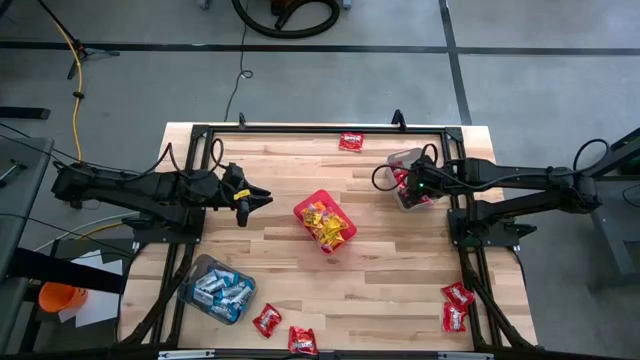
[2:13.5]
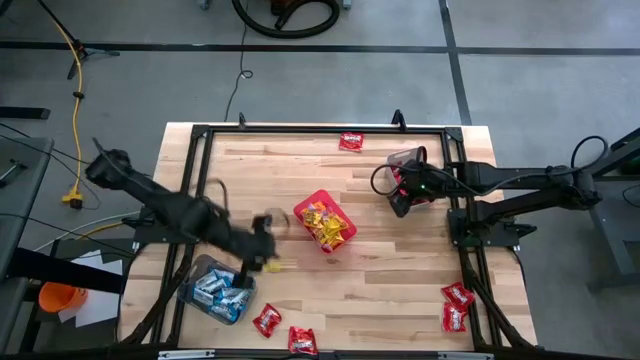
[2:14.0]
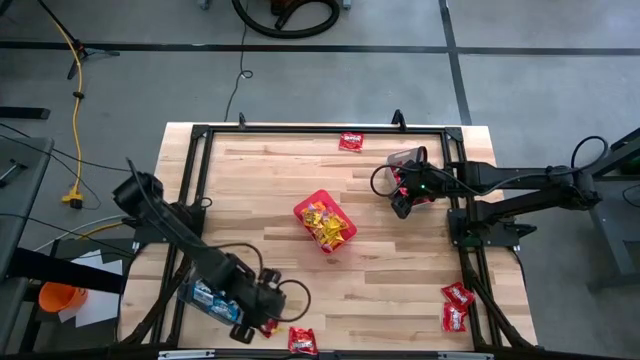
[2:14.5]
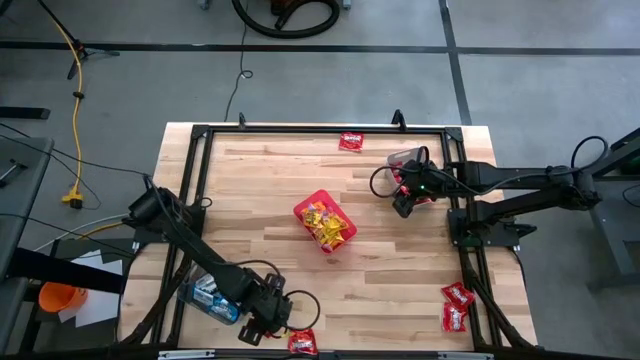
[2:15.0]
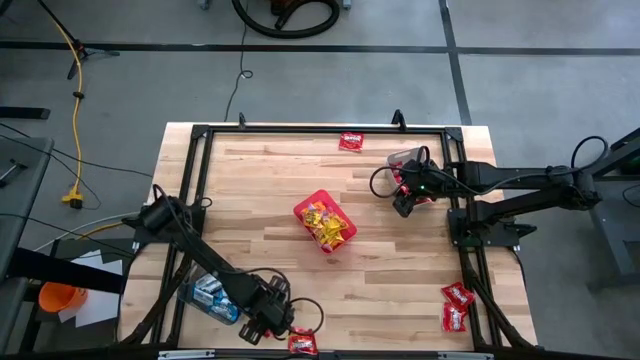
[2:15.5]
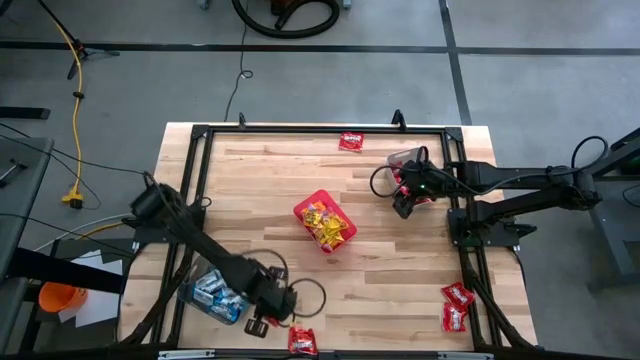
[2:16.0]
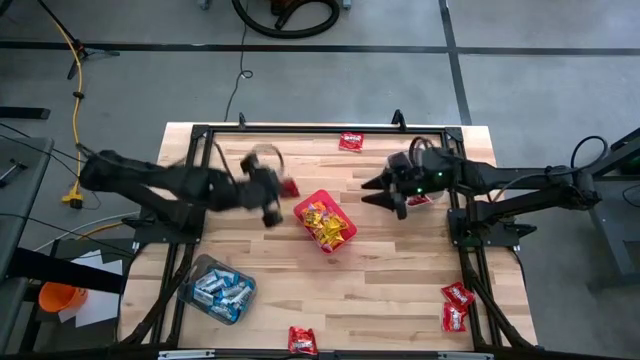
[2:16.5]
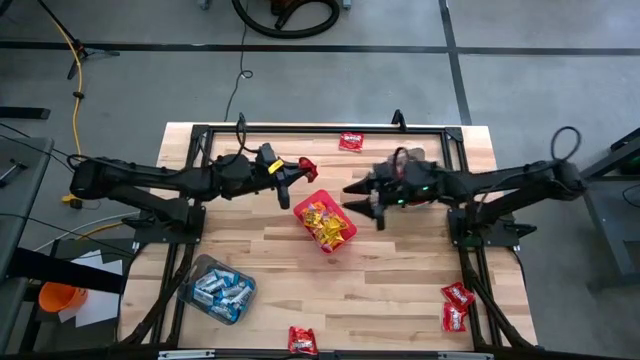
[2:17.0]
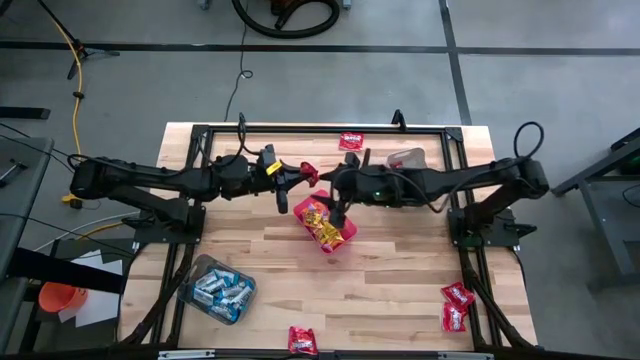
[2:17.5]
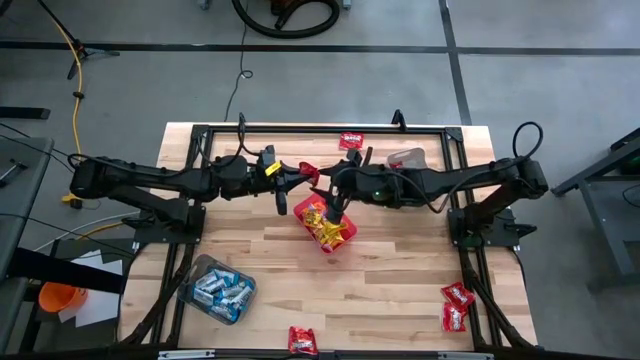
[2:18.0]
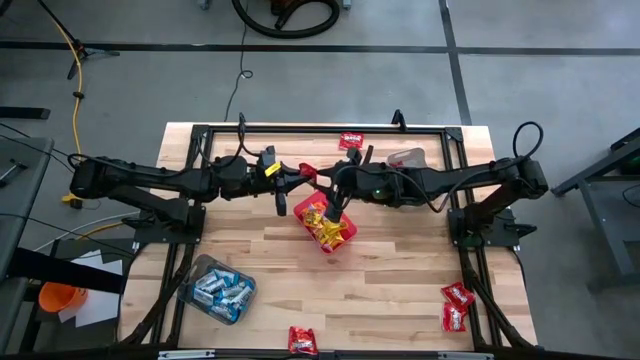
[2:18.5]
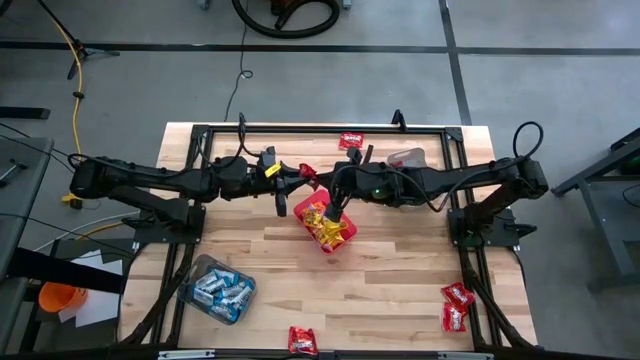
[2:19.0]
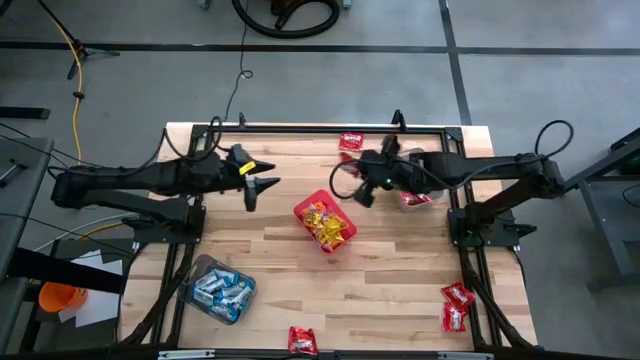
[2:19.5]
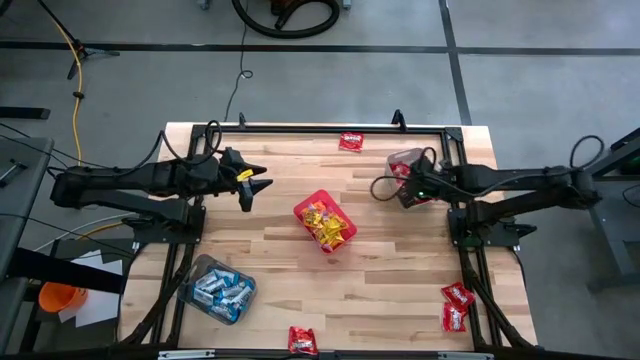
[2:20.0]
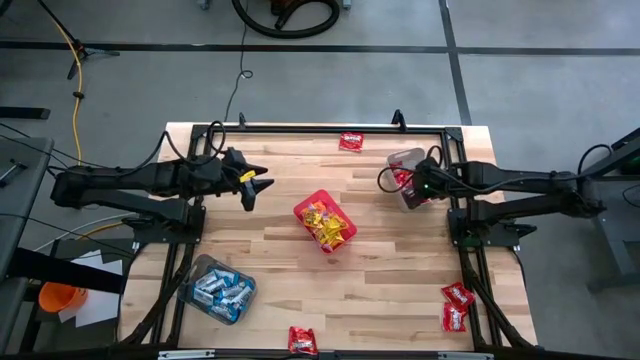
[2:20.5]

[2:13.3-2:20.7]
Task: Sort candy
Put the red candy into the gray bin

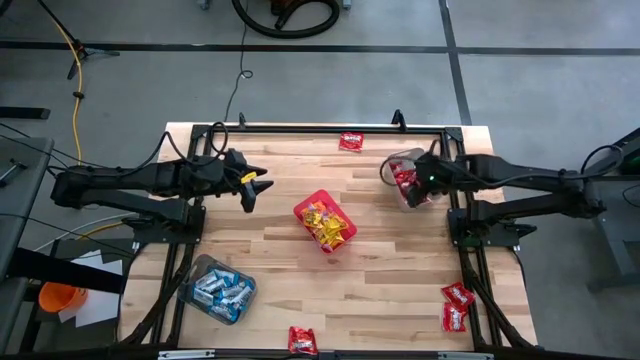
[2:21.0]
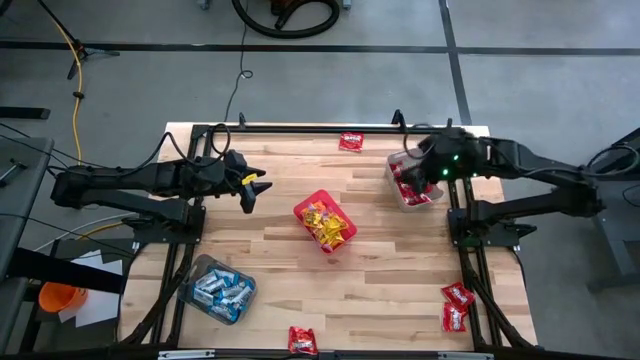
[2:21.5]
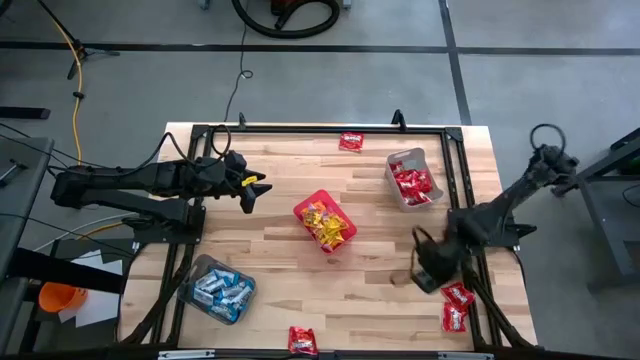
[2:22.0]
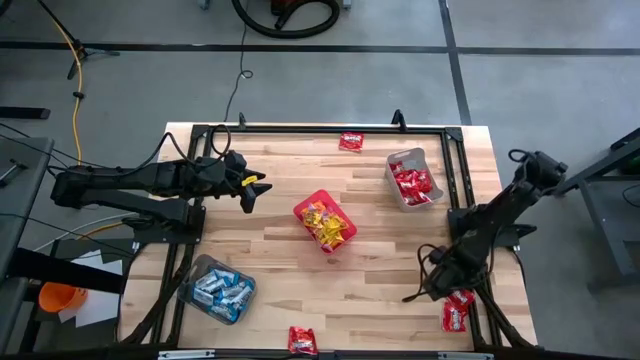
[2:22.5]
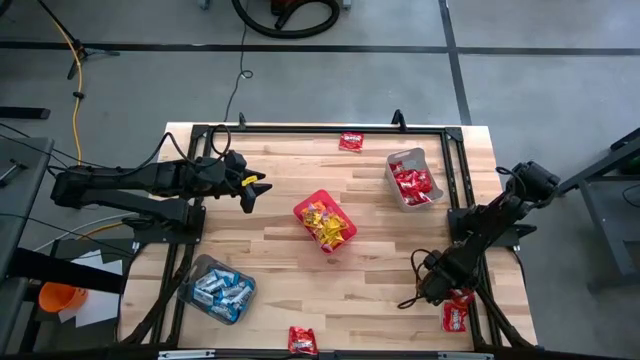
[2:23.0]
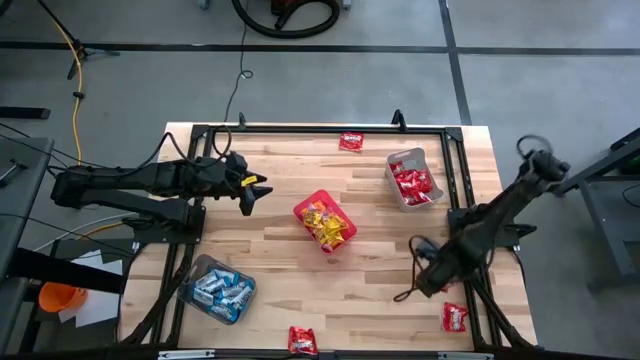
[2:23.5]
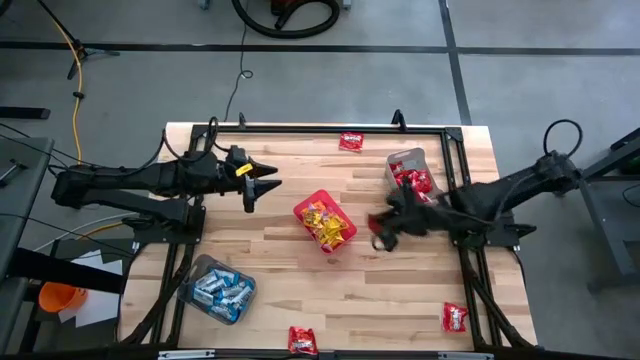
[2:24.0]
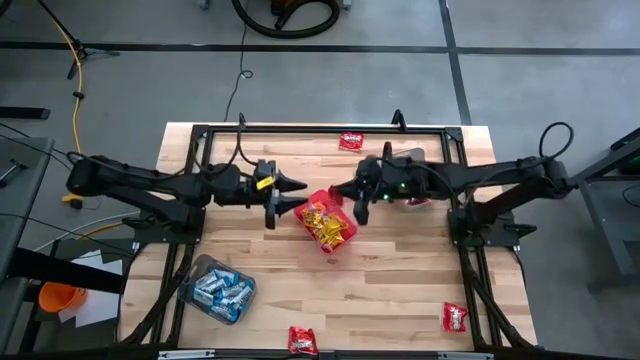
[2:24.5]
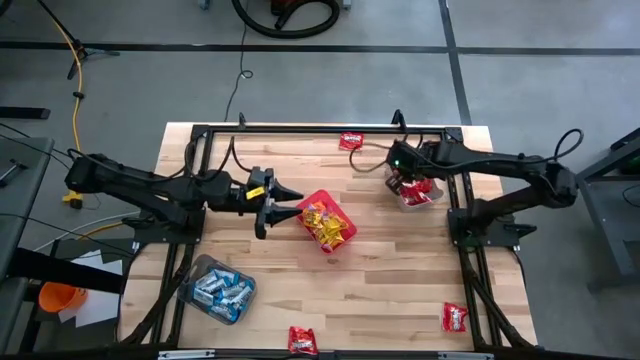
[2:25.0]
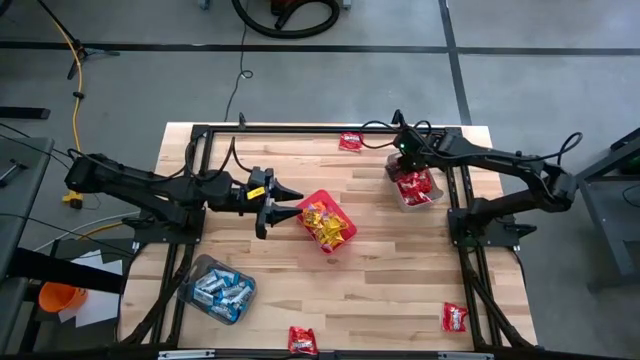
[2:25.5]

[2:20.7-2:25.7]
Put the red candy into the gray bin

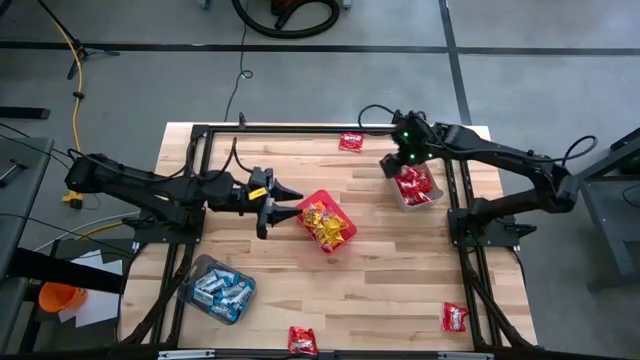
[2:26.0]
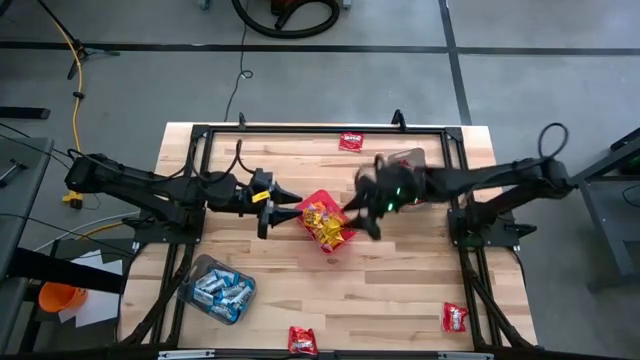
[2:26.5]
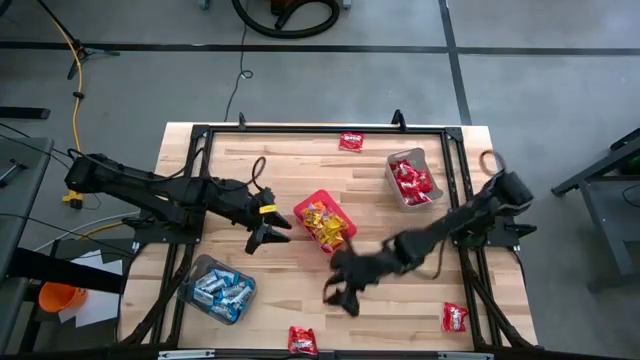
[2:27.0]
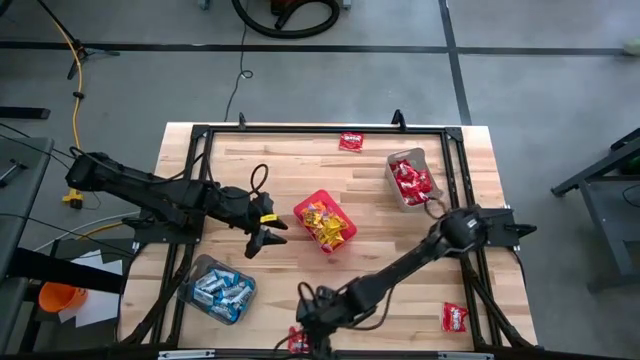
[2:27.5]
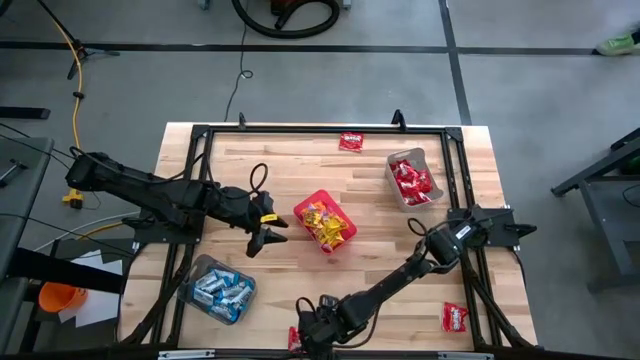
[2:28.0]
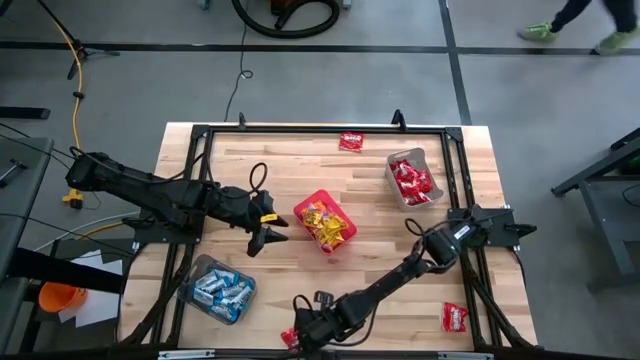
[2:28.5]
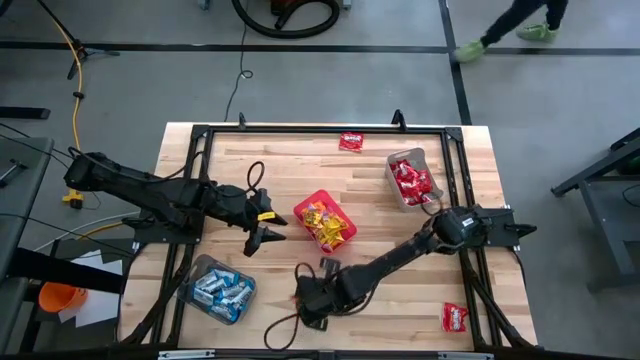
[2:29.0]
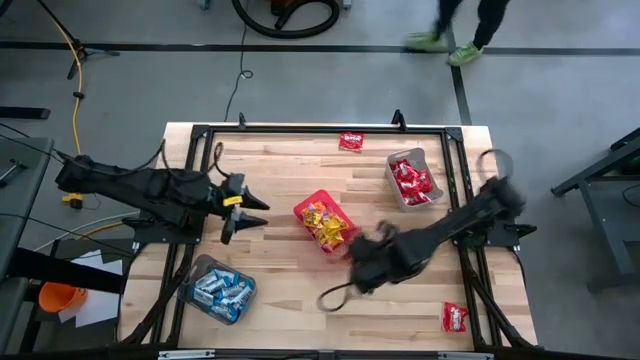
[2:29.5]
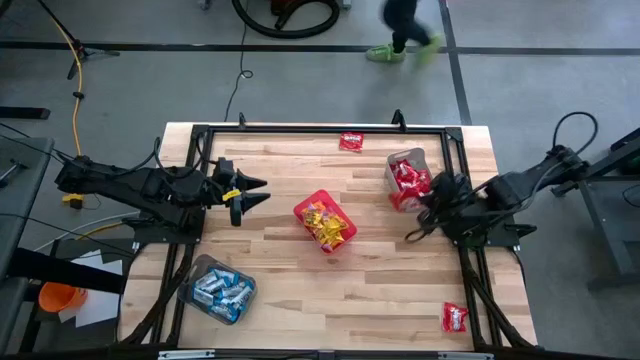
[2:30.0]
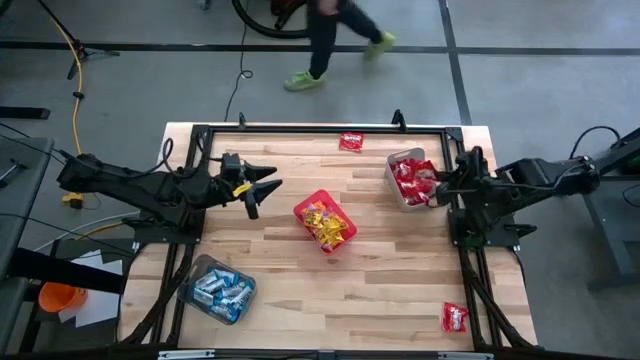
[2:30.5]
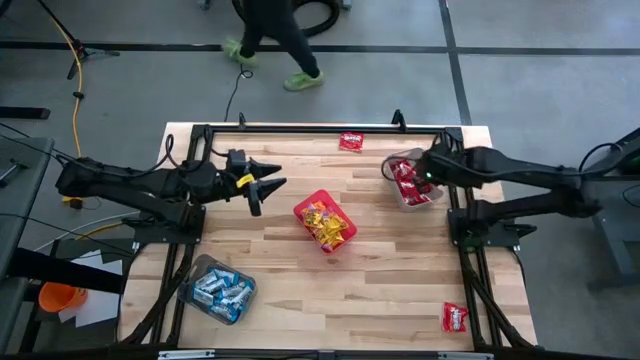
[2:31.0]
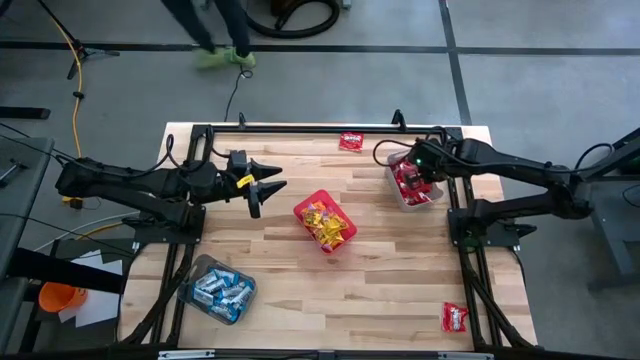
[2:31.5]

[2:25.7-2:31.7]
Put the red candy into the gray bin

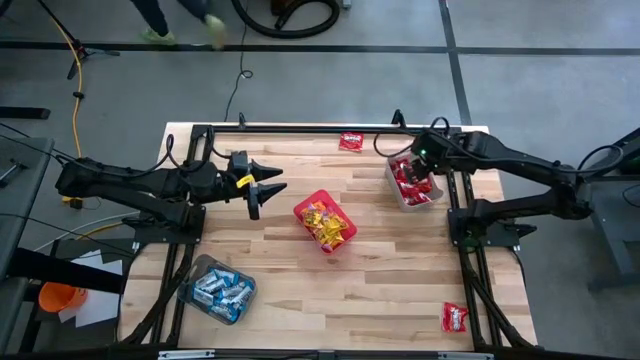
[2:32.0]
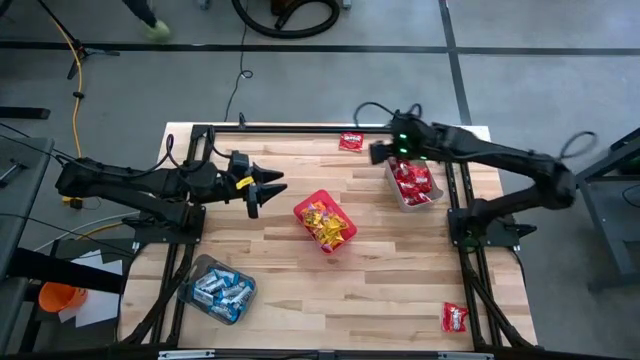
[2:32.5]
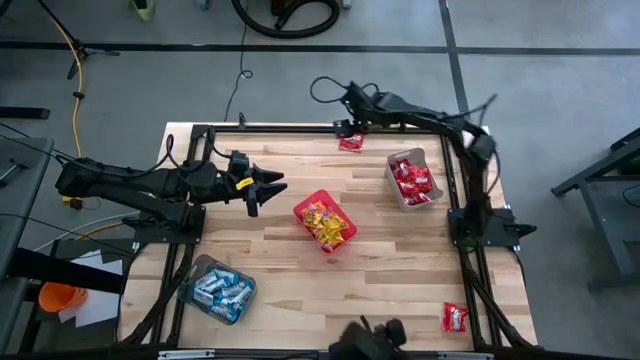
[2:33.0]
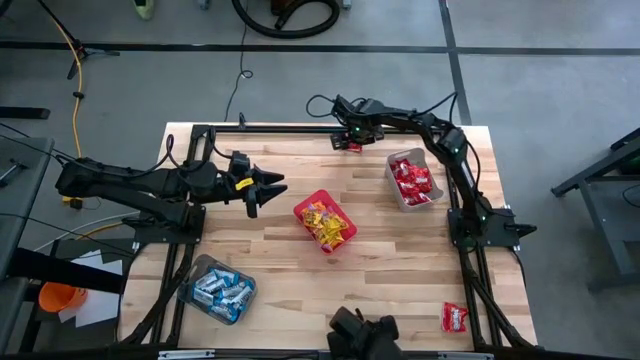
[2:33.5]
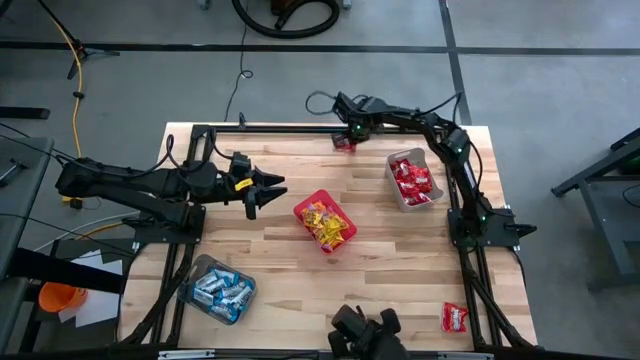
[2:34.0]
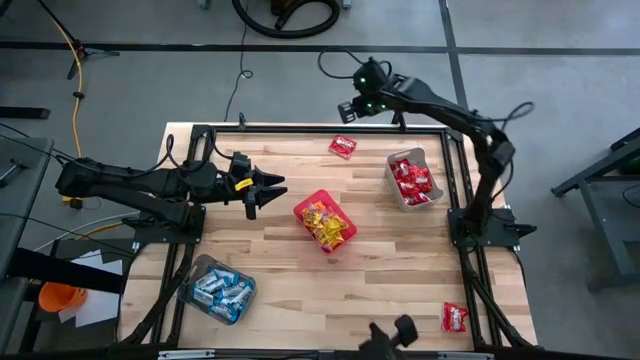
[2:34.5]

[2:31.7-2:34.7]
Put the red candy into the gray bin
